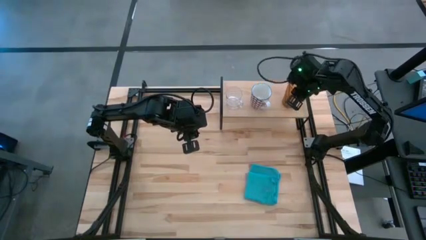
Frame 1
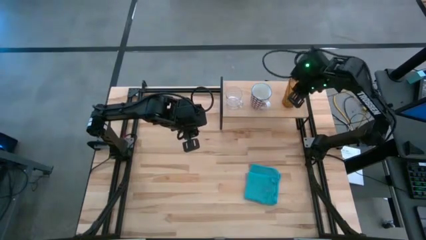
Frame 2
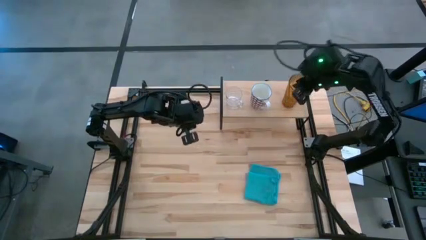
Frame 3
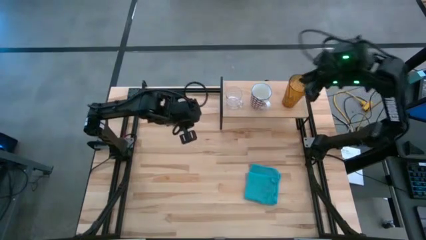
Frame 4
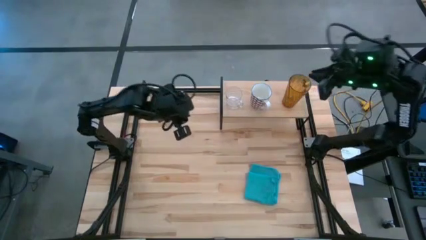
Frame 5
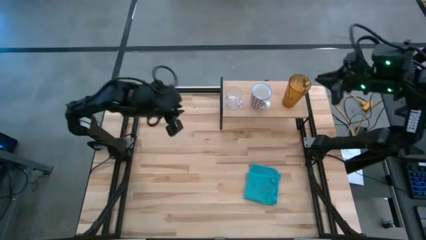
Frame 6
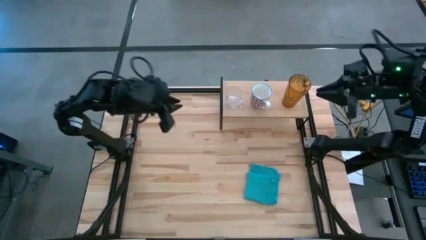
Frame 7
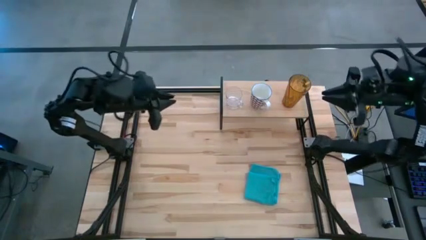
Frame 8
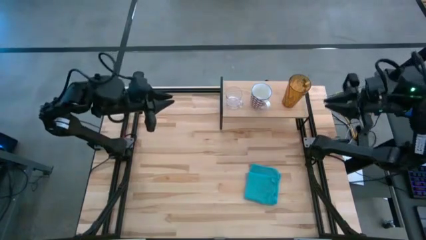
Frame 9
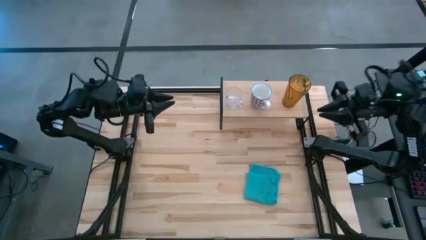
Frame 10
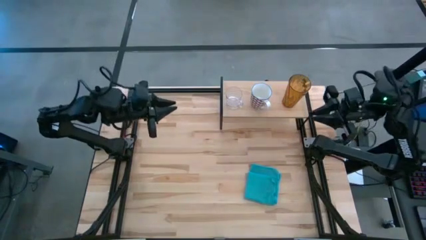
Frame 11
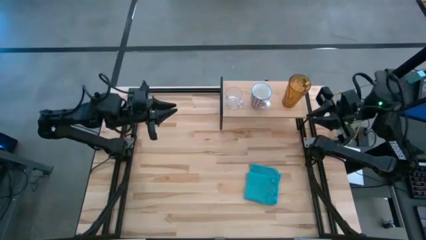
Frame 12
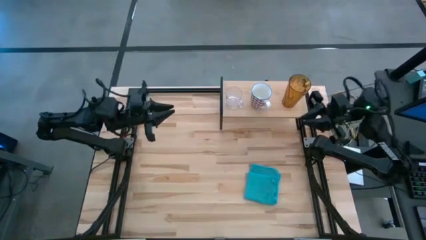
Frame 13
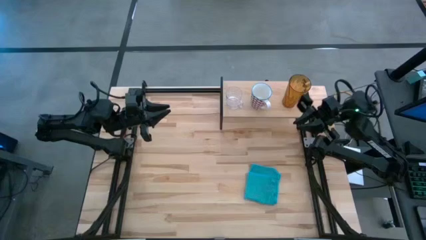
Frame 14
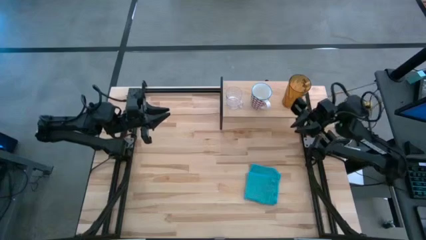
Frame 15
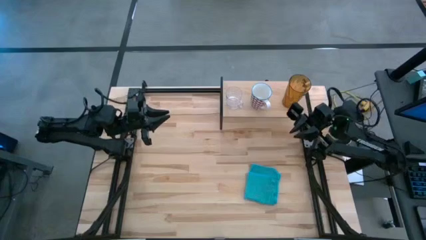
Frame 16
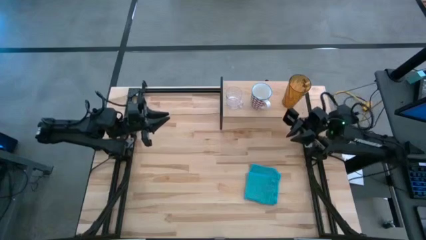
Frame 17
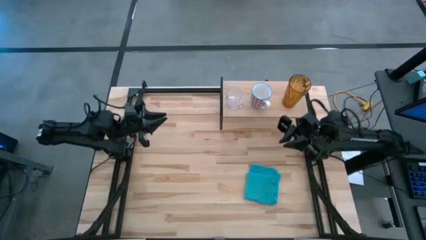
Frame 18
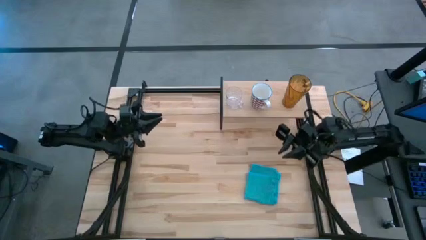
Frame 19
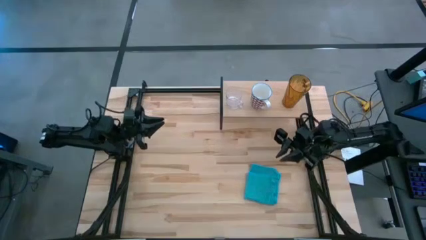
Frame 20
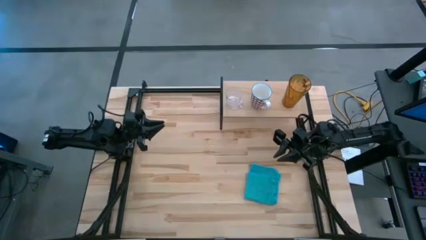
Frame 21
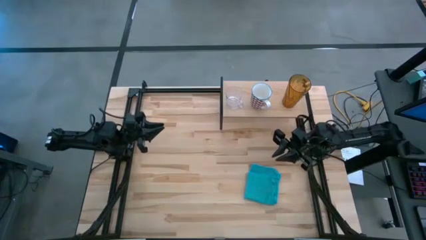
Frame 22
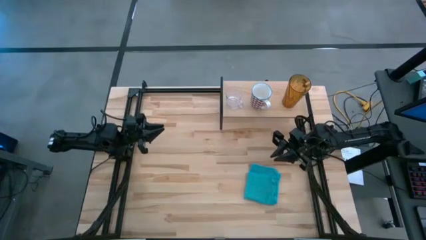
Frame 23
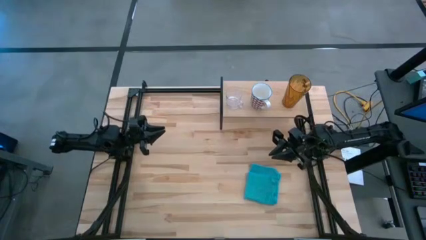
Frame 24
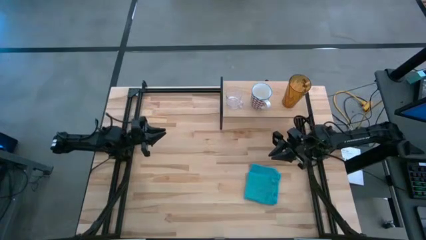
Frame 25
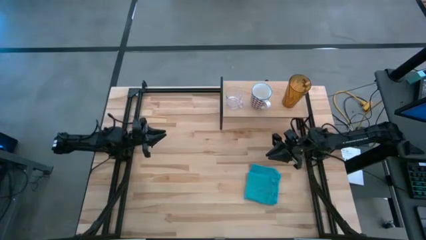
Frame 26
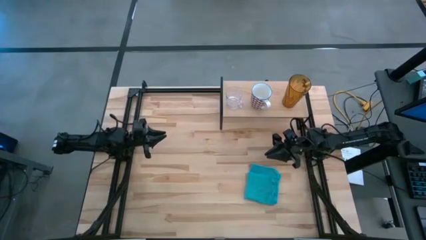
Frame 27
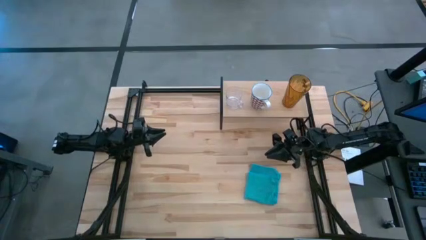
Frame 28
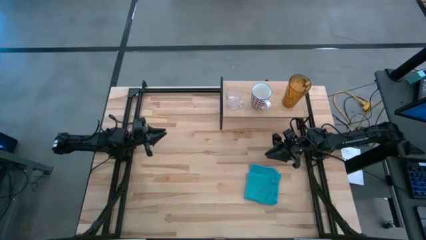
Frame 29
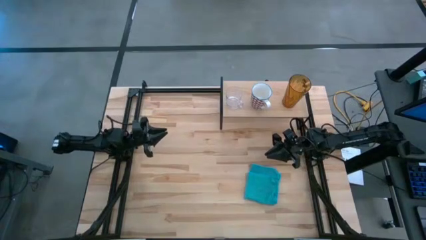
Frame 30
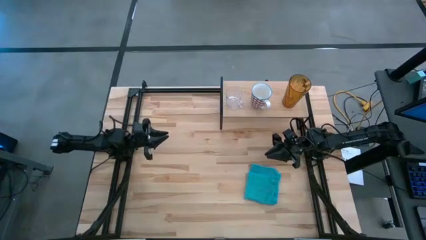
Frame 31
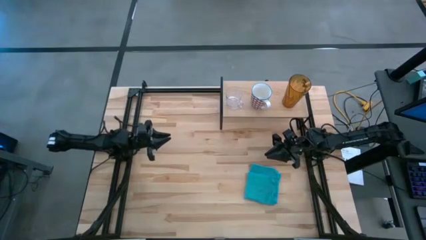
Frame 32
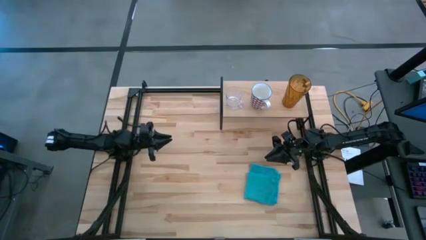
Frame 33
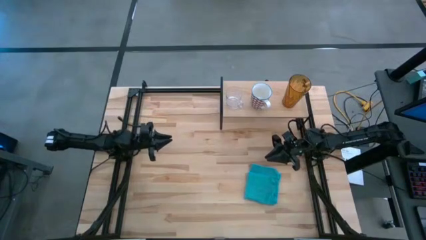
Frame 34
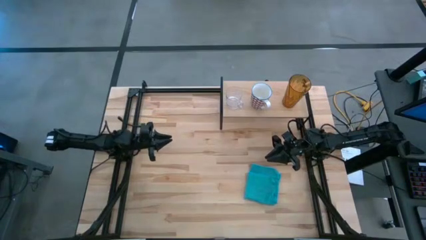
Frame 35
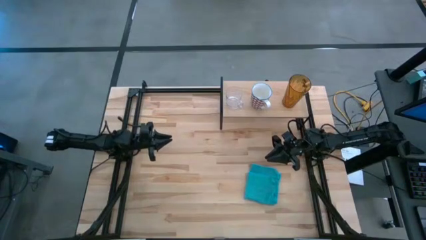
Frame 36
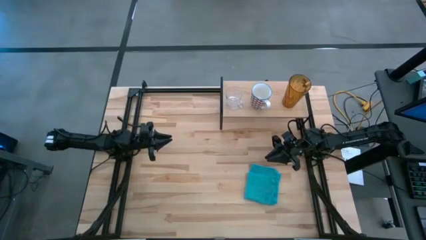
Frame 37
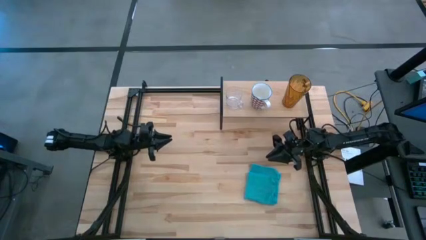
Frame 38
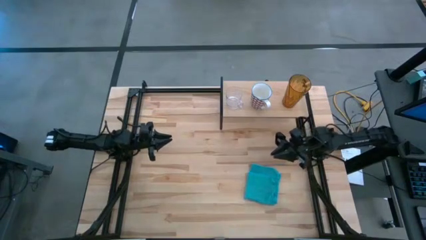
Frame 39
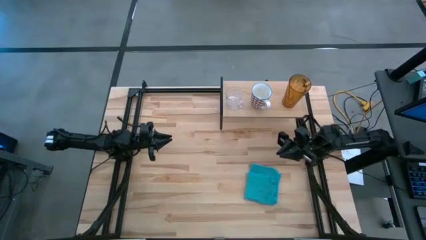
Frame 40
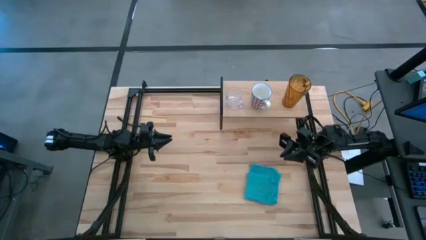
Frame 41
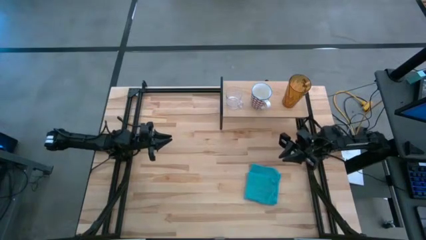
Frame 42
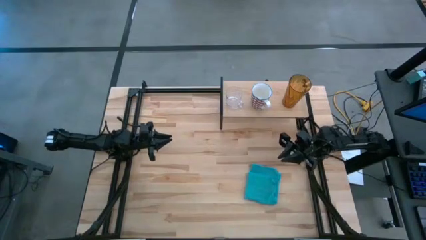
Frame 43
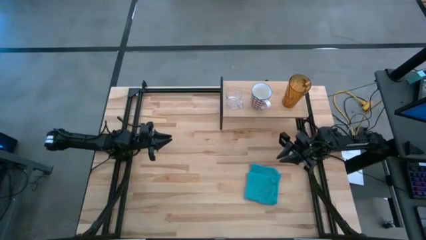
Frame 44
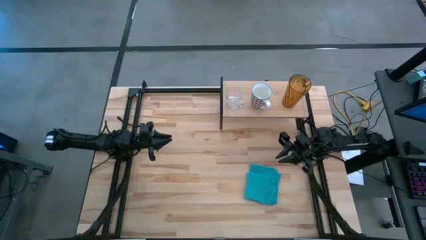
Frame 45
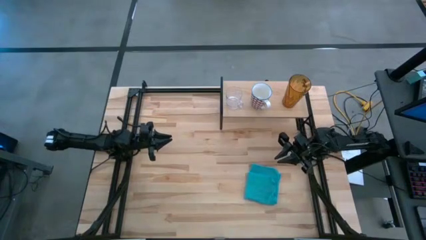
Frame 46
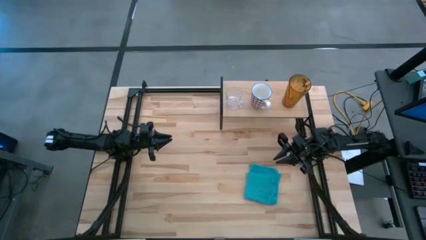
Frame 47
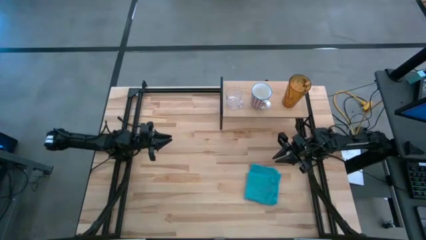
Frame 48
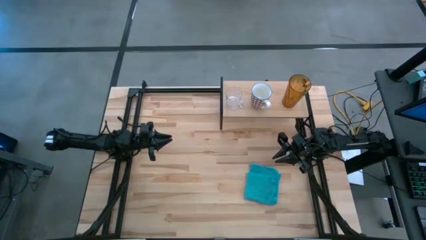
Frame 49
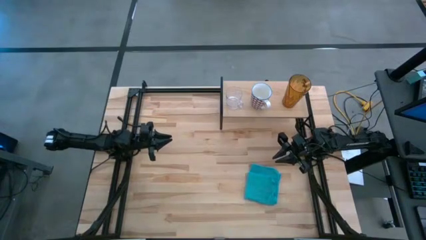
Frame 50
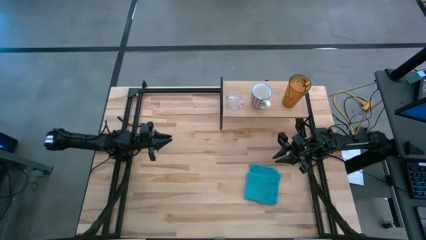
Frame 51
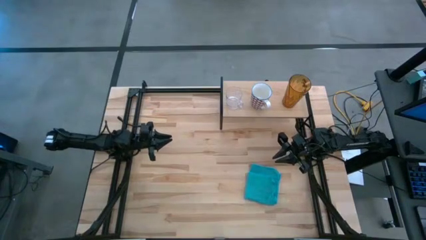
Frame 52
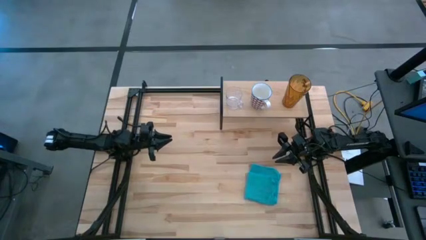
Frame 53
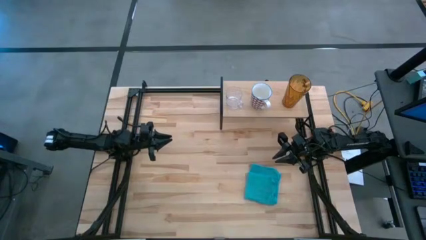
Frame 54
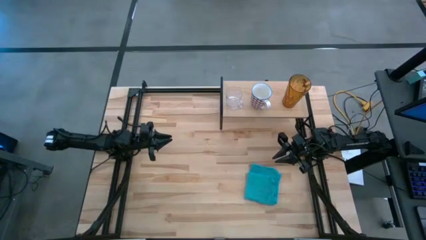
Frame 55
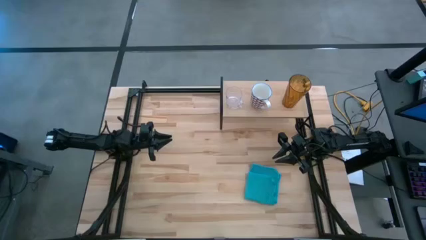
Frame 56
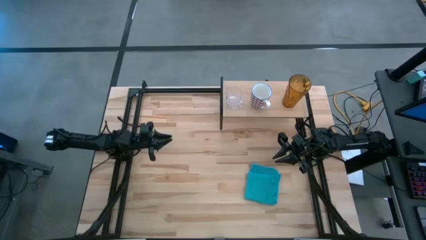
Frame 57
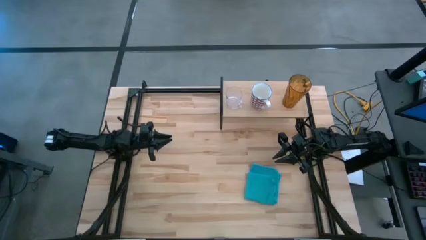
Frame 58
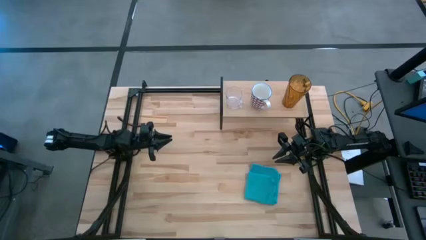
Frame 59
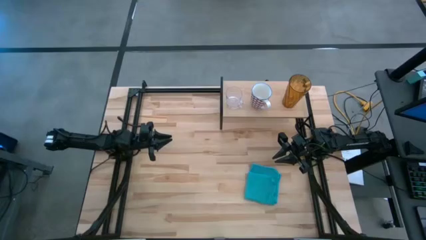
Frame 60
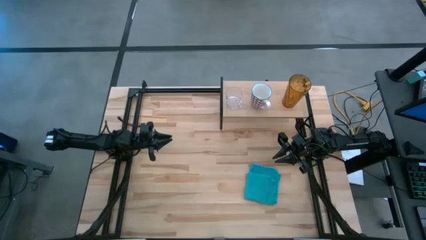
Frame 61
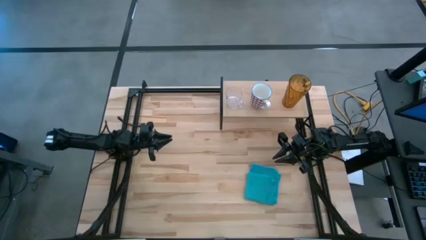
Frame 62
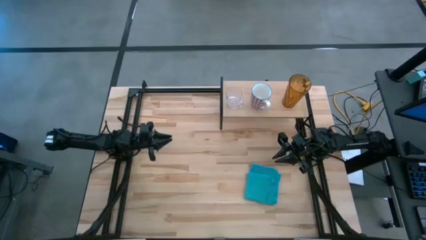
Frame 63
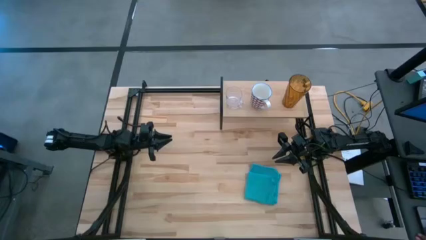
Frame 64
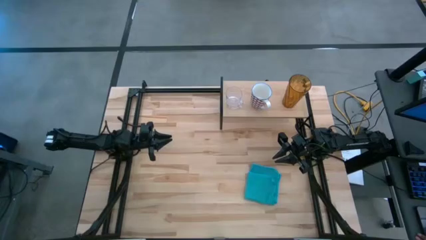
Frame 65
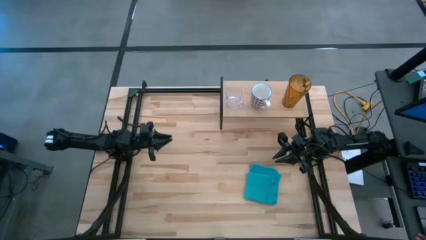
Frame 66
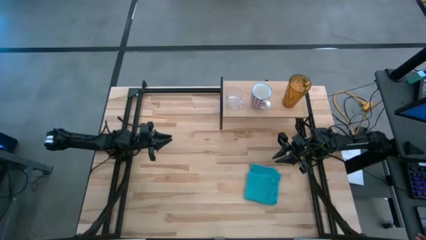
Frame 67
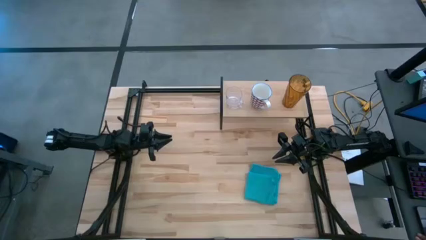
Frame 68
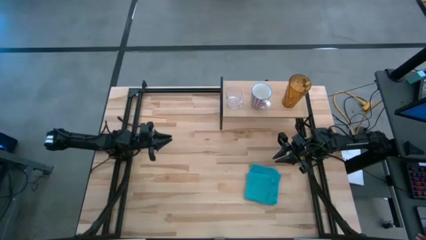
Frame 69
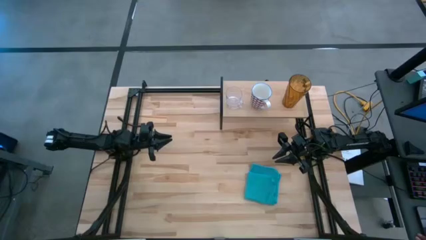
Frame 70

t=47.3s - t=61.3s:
Task: Stack small to large cups/mugs on shelf
Return to Home Position

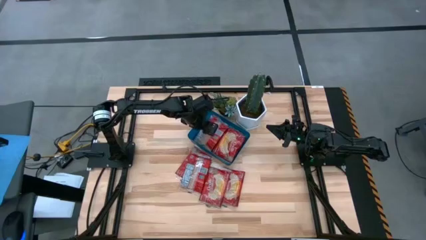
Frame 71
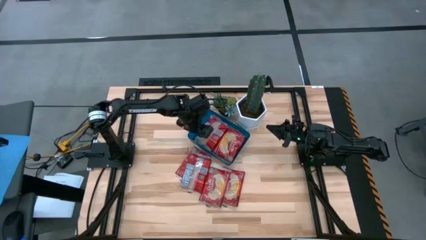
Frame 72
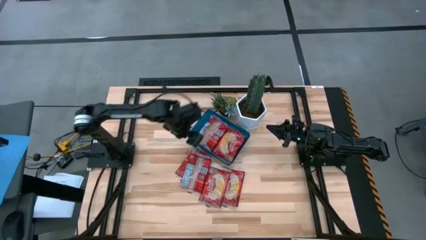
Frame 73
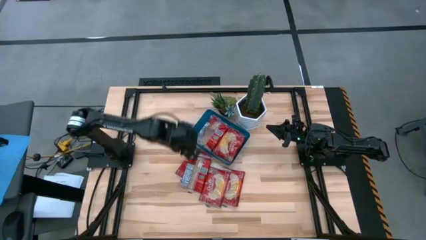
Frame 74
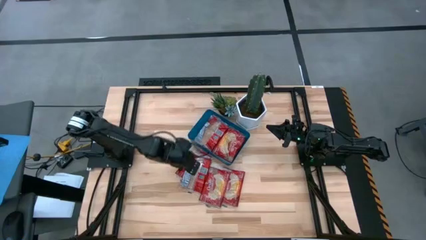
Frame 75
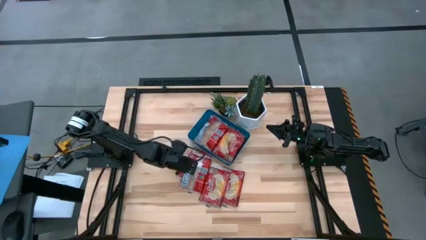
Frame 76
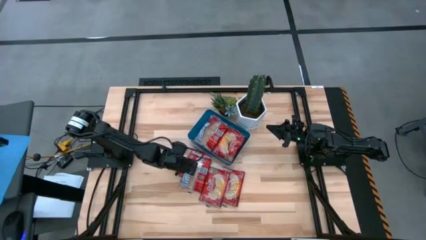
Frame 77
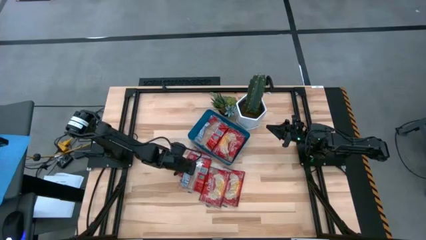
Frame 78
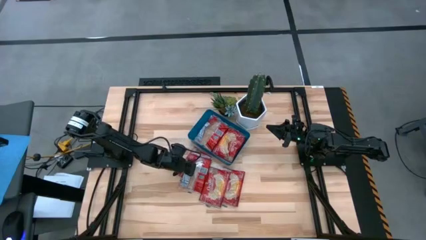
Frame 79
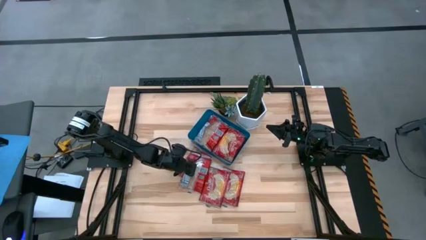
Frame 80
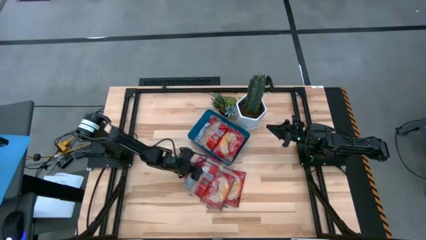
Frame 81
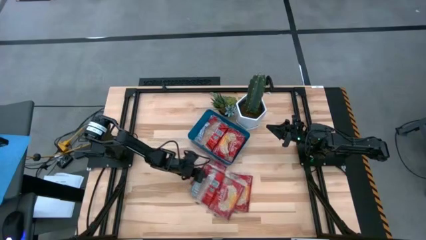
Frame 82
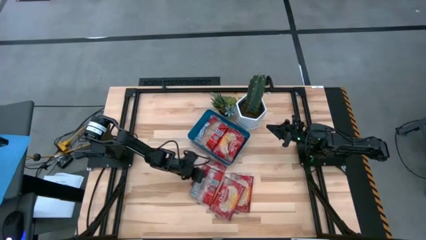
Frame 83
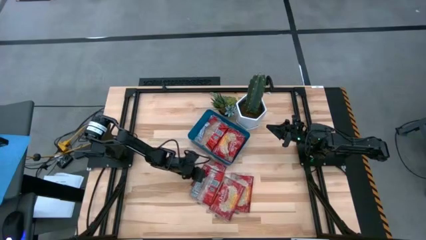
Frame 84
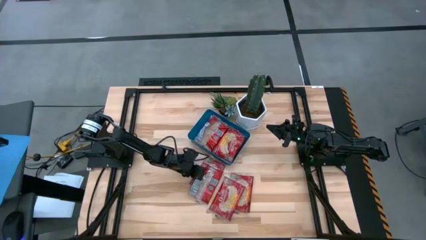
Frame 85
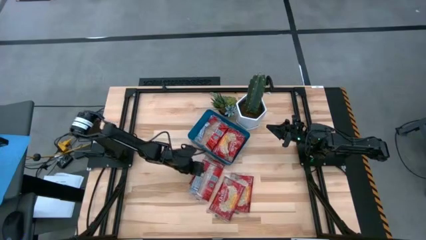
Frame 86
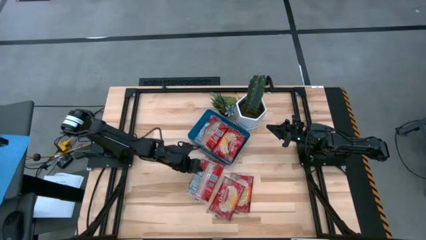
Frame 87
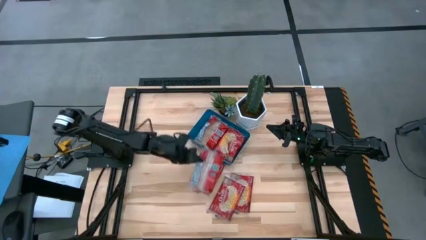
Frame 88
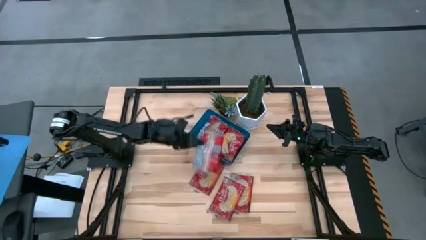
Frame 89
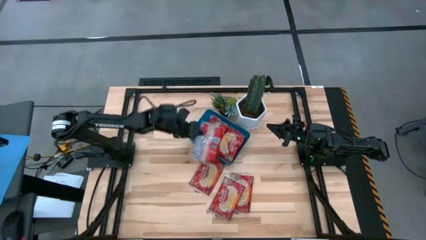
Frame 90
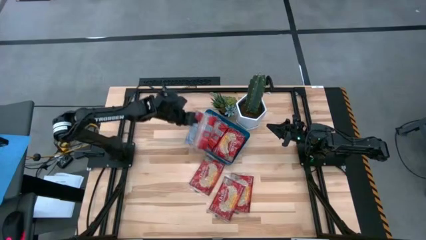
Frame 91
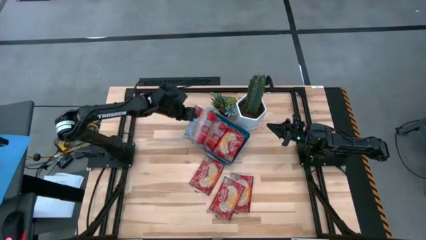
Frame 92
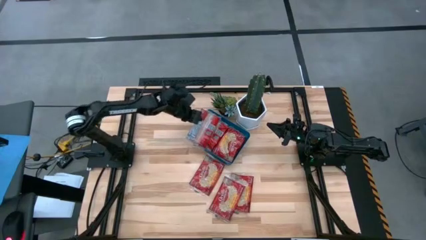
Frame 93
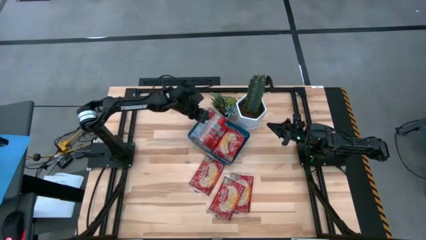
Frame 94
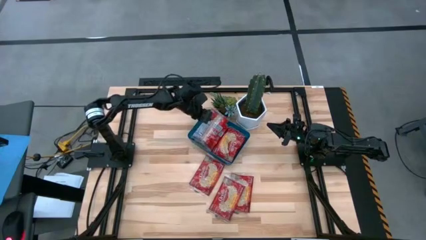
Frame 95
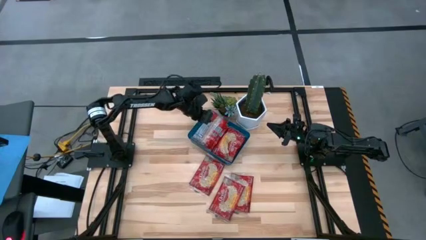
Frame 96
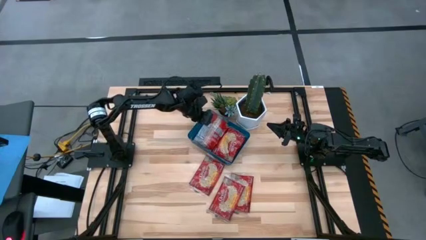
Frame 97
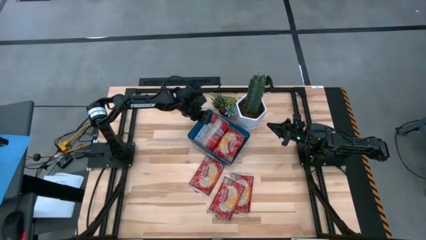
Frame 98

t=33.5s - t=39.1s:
Task: Sort popcorn bags into baskets
Put the popcorn bag into the blue bin
